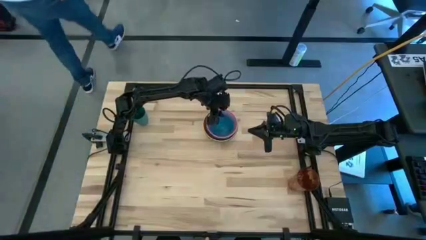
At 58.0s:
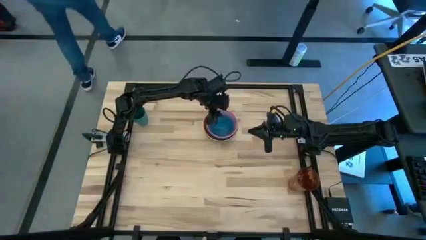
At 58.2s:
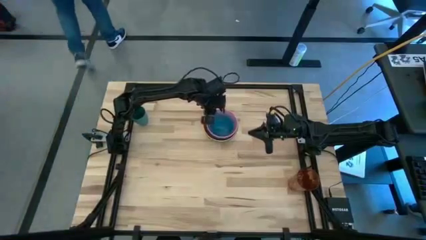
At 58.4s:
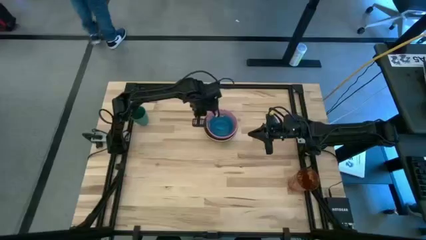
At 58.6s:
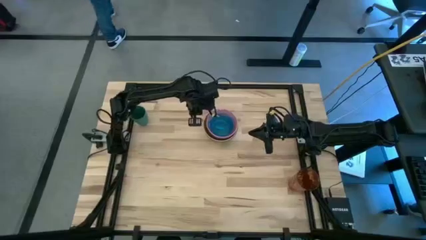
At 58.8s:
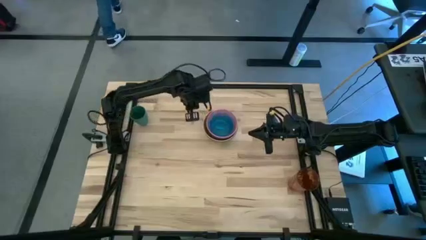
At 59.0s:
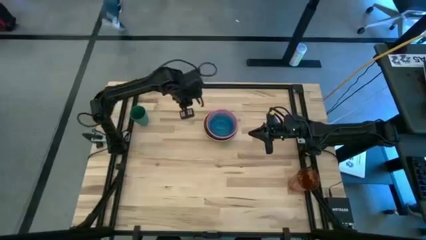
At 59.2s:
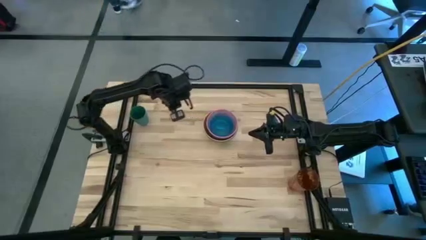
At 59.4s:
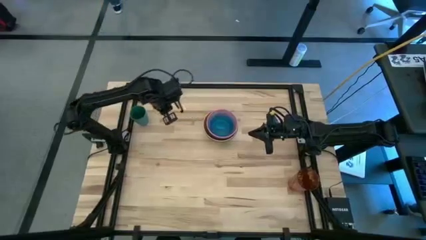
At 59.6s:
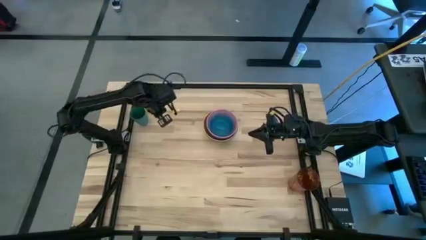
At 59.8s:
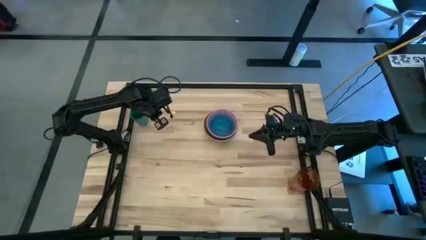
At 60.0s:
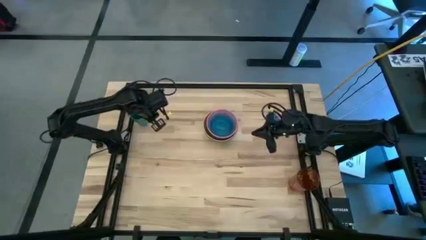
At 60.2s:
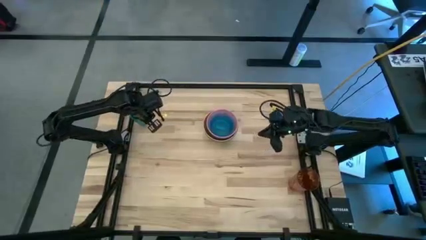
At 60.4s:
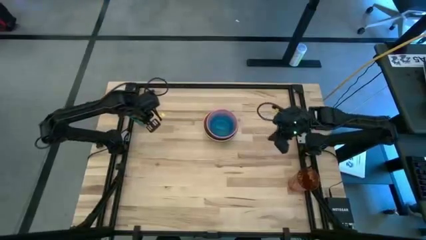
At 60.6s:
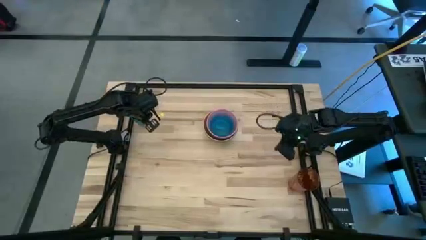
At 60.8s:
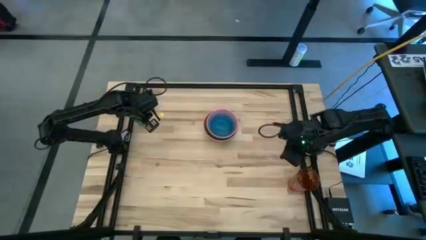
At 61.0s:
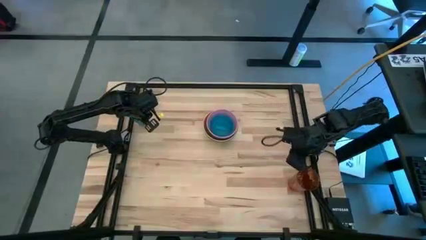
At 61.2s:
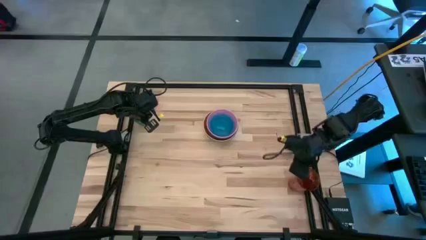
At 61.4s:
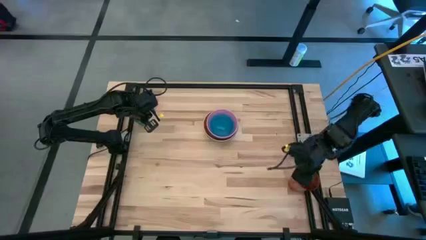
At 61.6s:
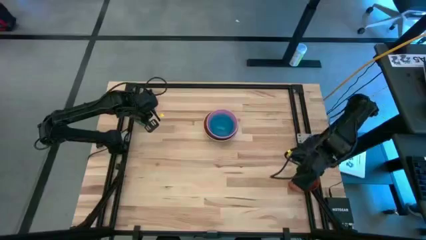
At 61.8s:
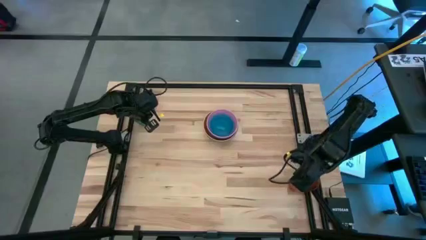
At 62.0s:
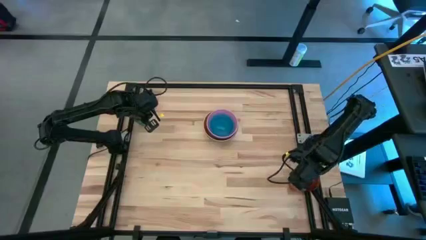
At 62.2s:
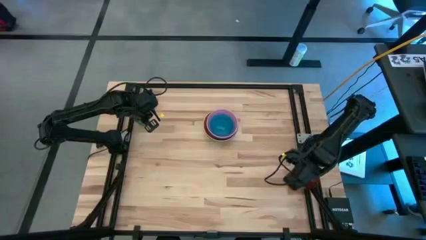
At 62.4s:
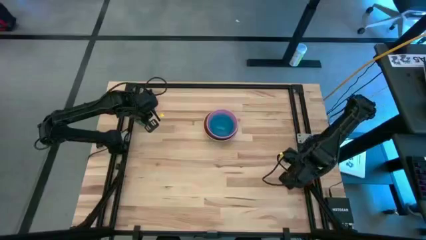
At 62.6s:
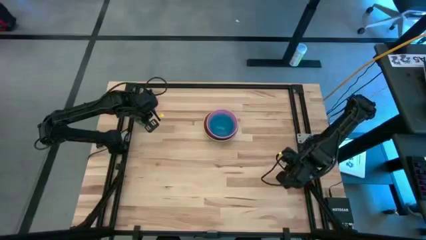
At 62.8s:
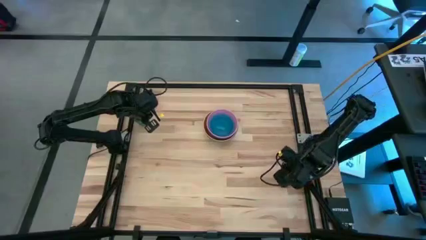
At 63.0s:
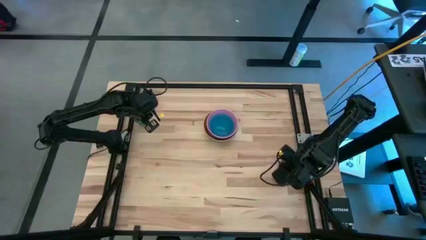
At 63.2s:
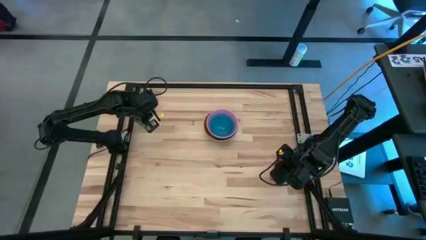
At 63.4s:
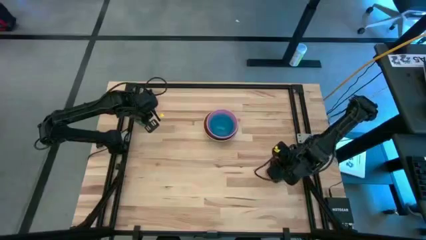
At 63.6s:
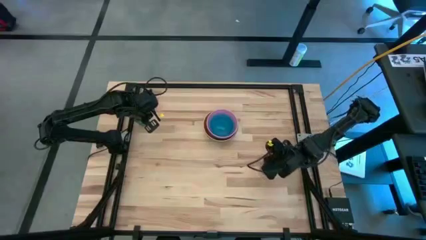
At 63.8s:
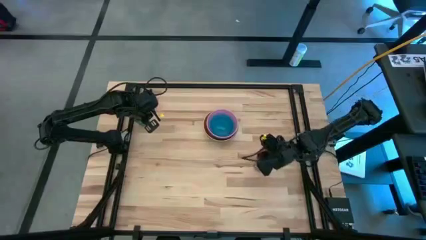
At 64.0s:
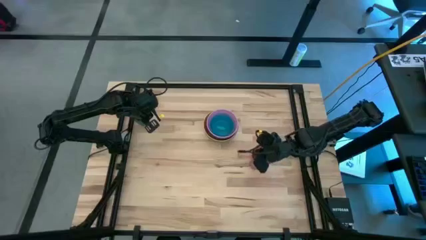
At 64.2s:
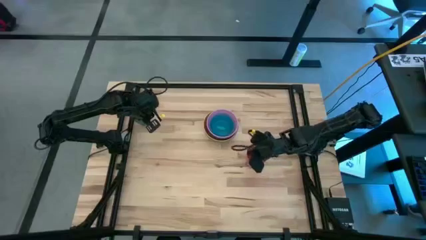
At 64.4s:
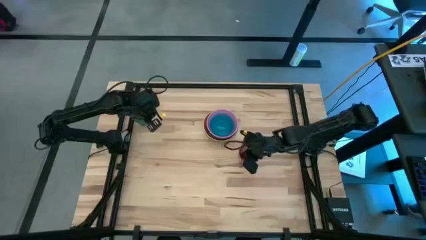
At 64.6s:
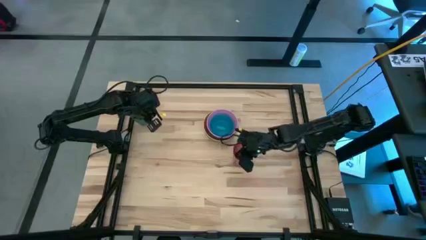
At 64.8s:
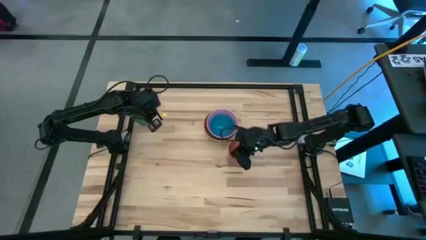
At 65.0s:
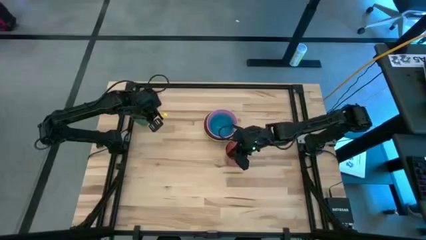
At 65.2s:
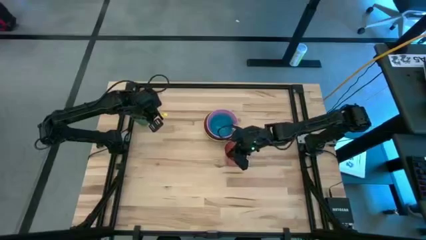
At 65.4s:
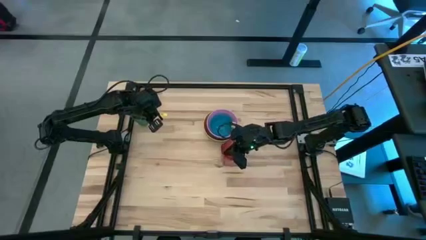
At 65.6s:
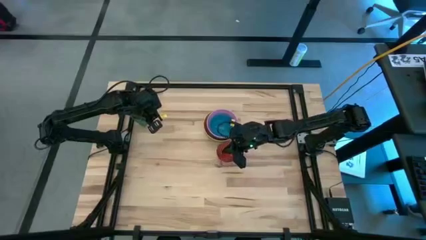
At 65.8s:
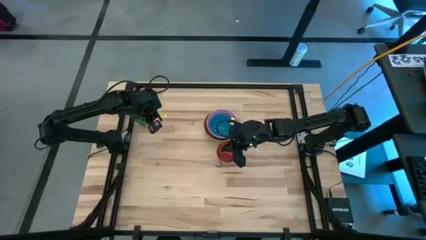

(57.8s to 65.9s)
Move the red cup on the table

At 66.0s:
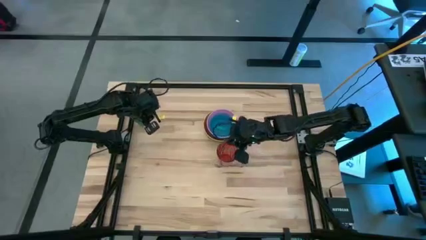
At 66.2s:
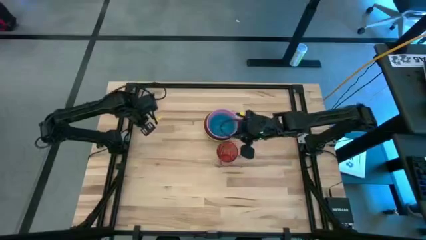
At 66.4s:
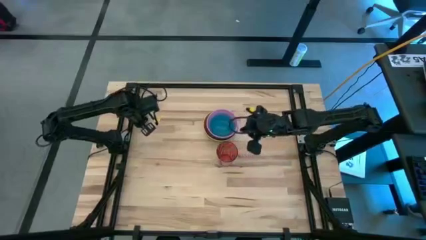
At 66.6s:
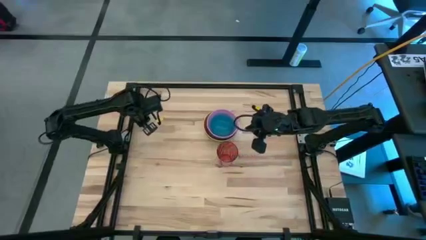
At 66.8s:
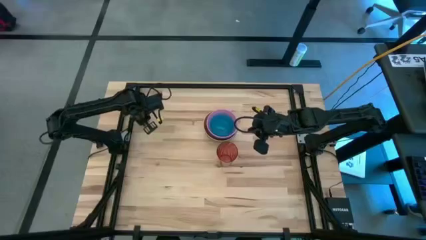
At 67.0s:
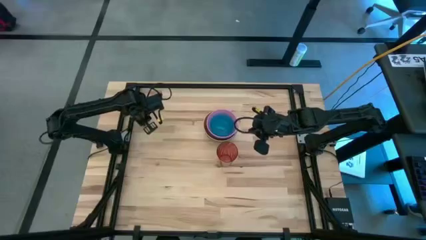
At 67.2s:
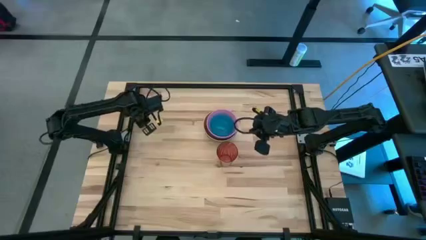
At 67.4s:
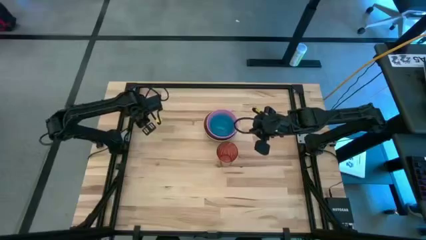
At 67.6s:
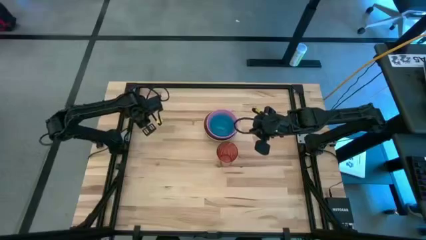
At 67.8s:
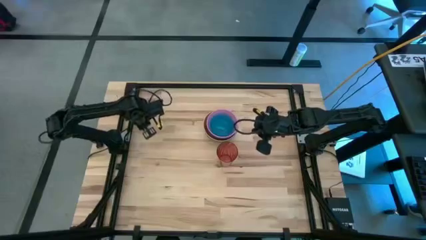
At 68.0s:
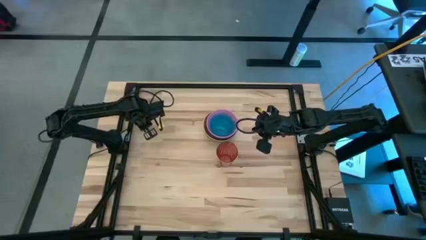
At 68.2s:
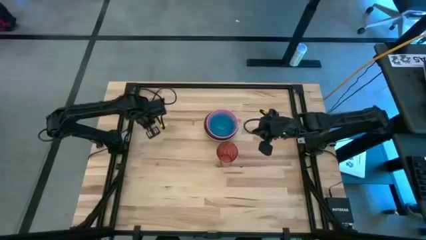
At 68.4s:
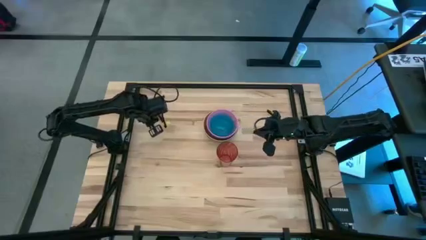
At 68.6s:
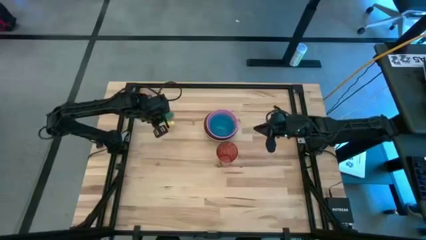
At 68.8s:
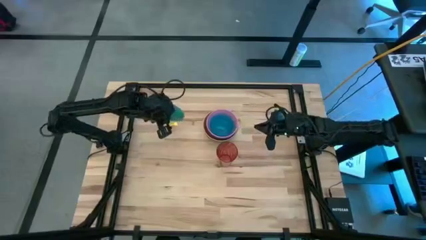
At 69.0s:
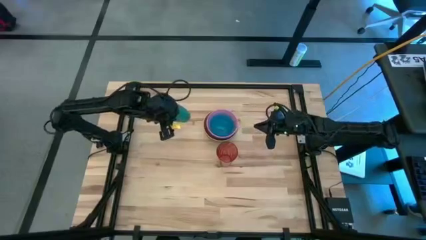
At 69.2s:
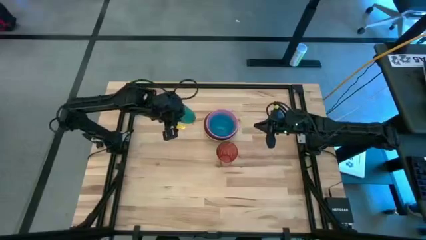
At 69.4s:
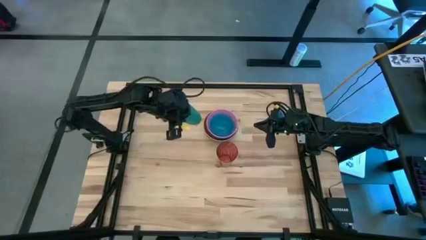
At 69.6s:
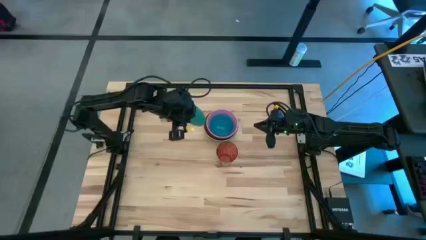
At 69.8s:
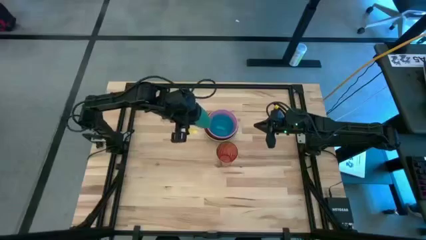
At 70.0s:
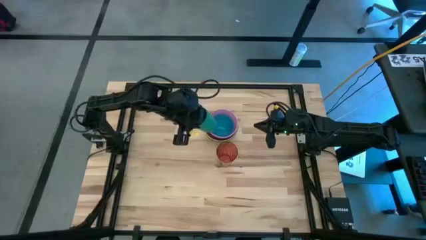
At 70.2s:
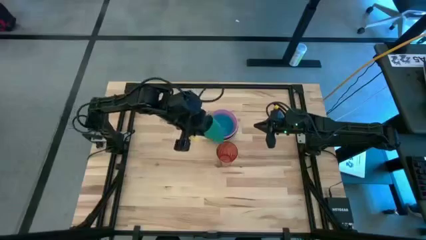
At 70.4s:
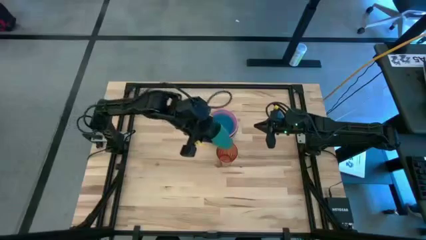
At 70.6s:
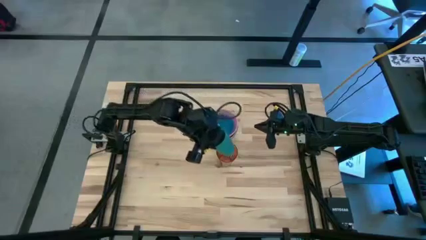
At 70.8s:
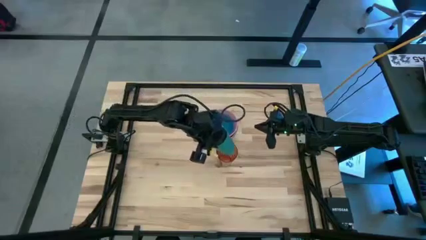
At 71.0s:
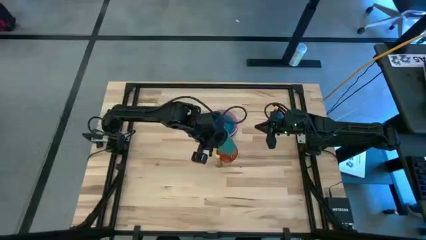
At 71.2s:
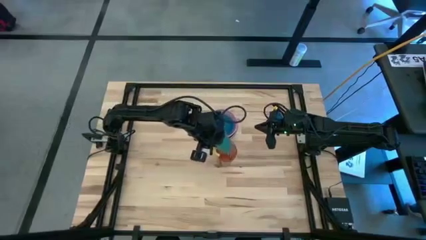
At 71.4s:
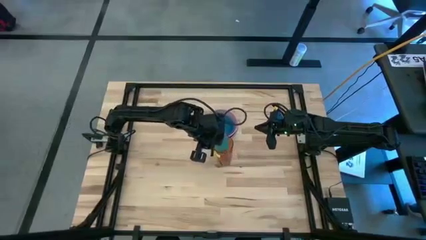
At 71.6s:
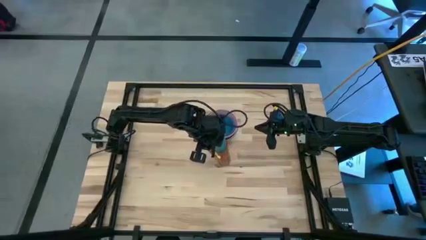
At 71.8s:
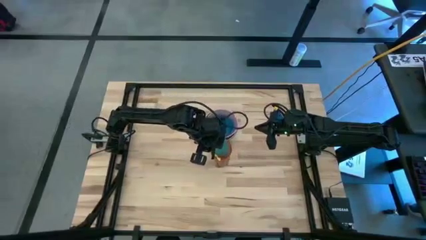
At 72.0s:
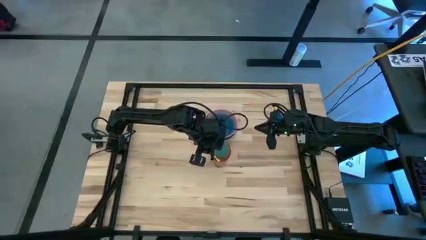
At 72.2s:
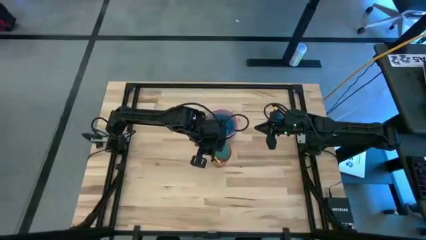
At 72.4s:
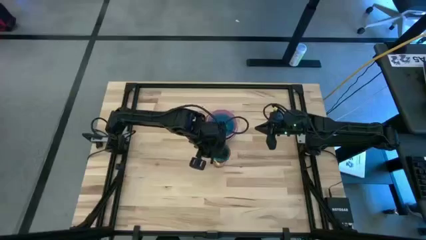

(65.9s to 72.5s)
Stack the green cup on top of the red cup
